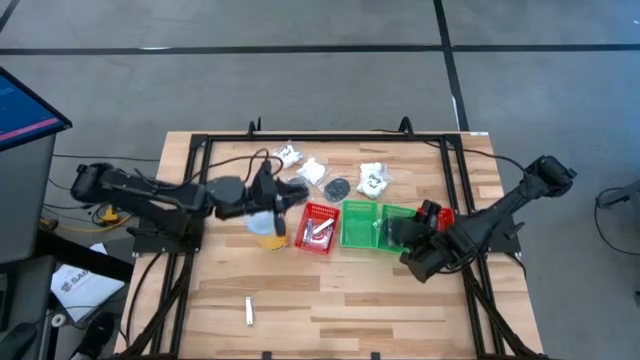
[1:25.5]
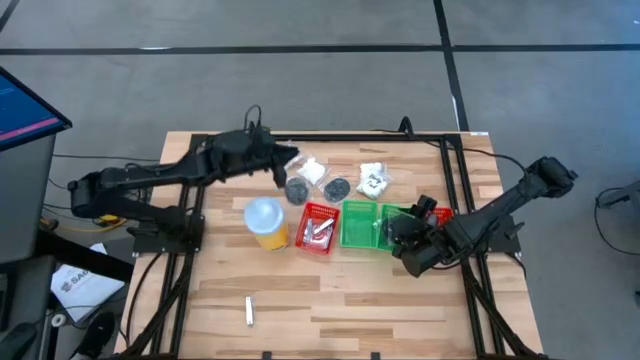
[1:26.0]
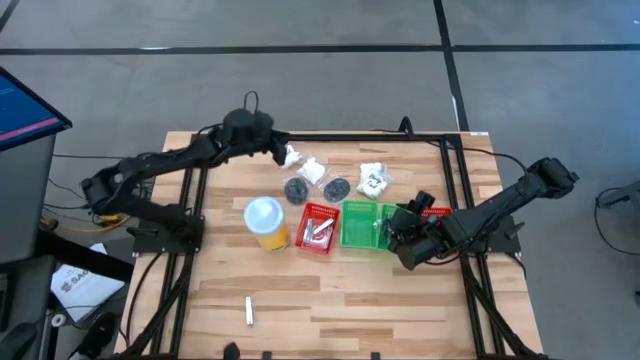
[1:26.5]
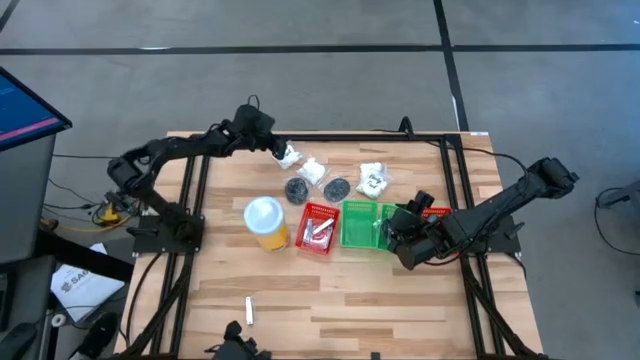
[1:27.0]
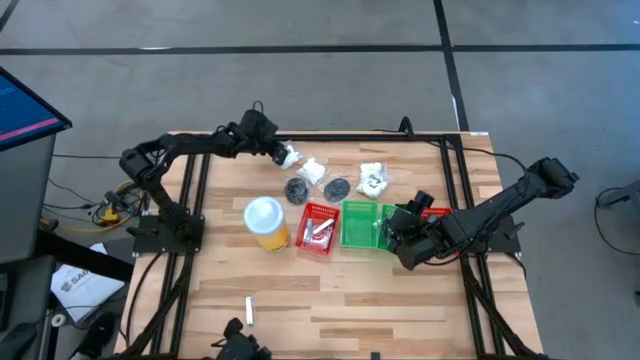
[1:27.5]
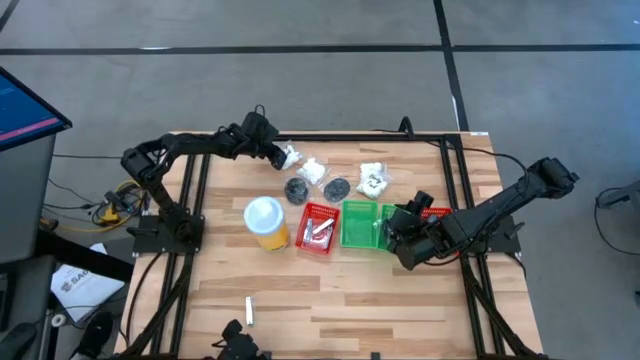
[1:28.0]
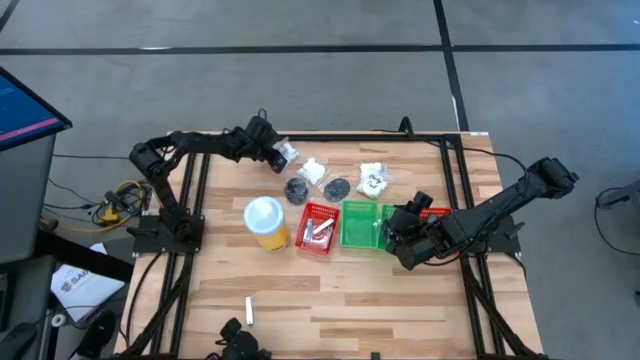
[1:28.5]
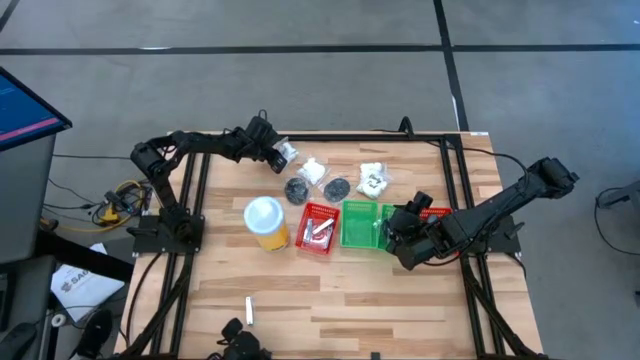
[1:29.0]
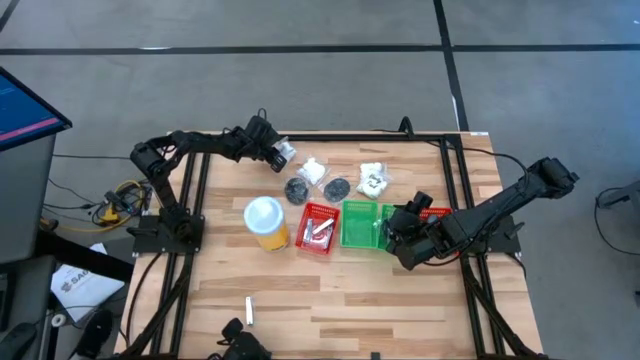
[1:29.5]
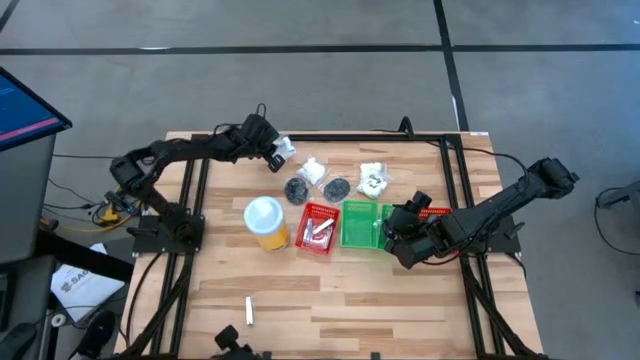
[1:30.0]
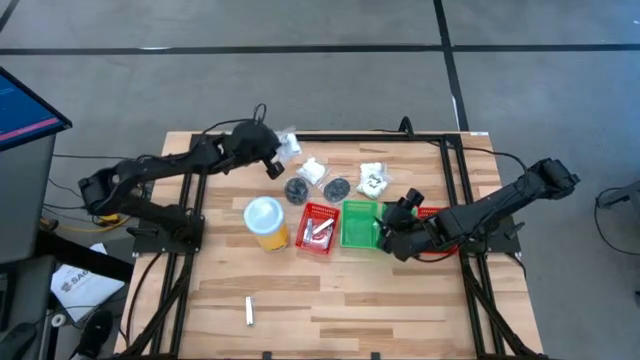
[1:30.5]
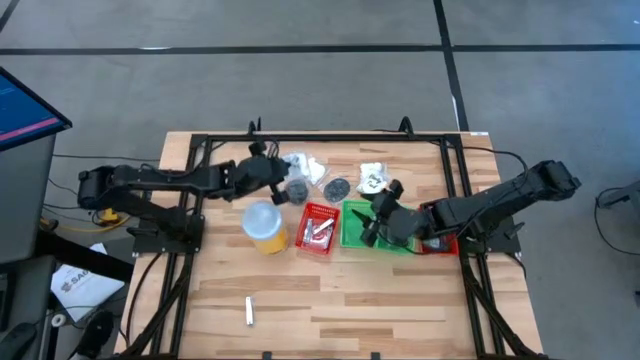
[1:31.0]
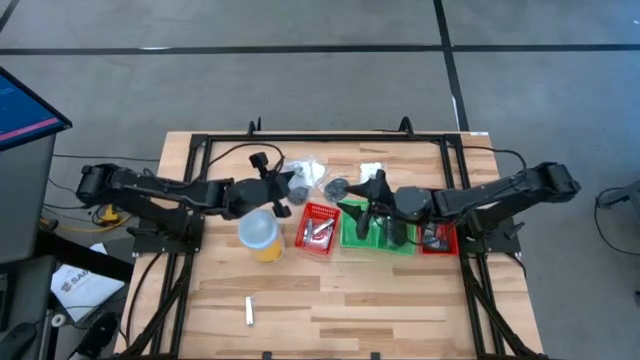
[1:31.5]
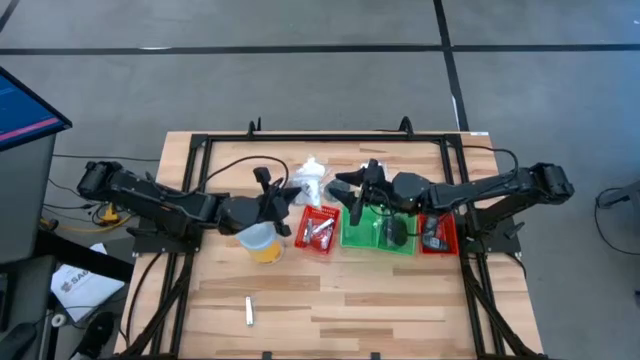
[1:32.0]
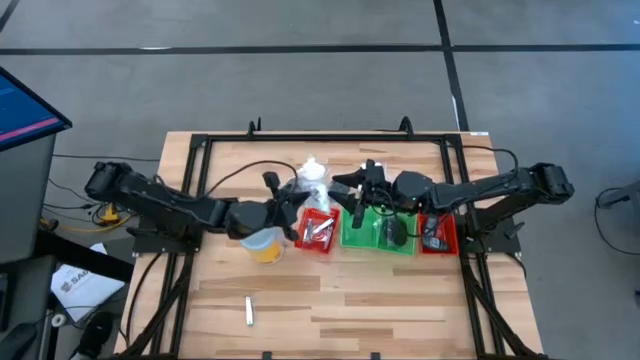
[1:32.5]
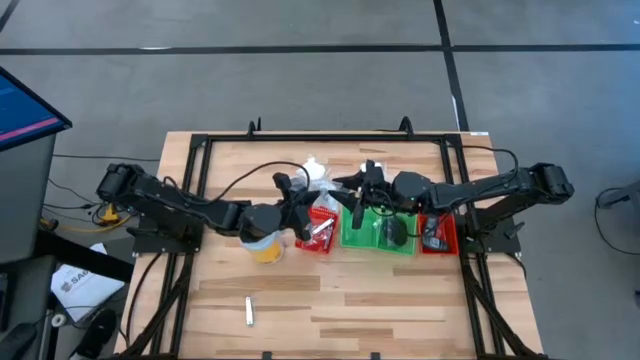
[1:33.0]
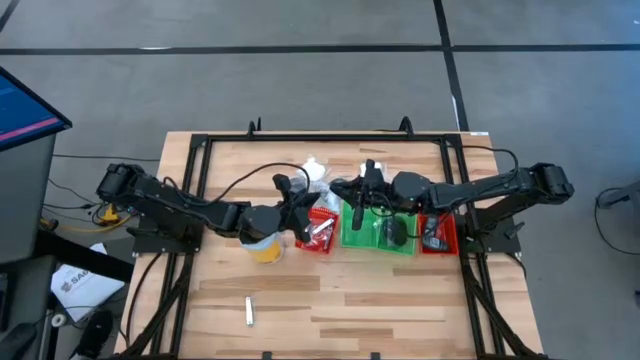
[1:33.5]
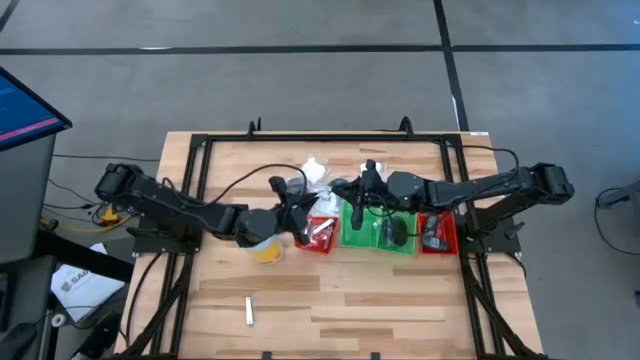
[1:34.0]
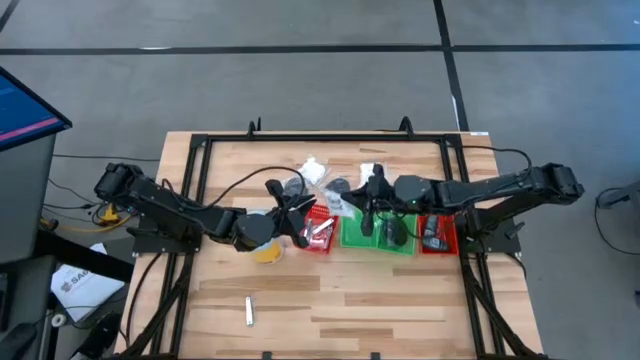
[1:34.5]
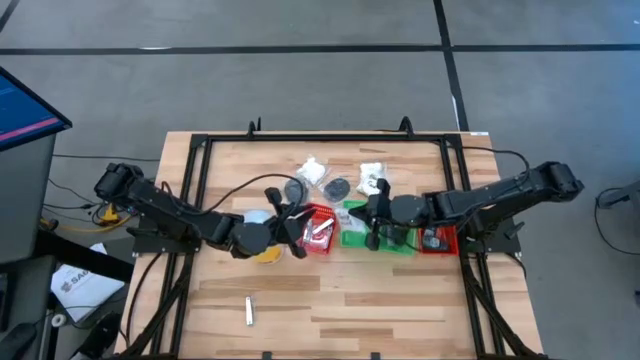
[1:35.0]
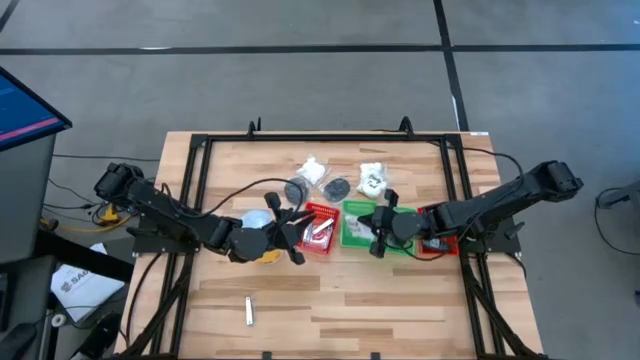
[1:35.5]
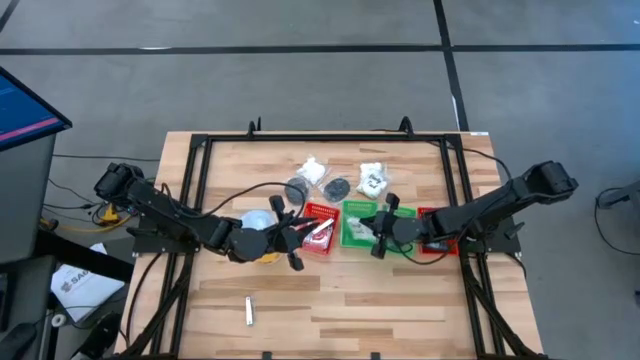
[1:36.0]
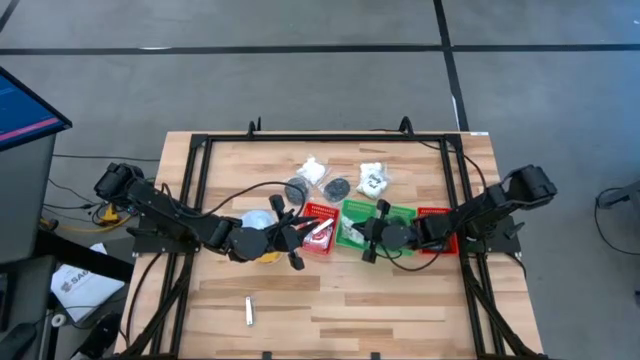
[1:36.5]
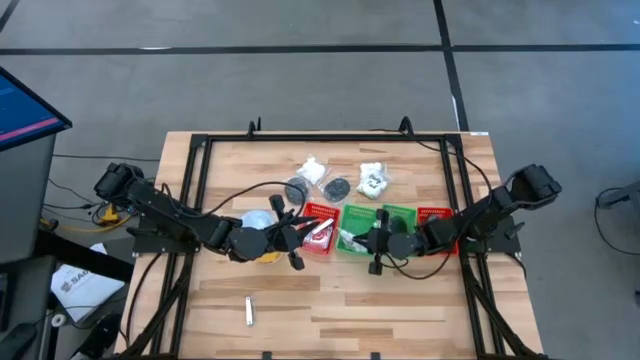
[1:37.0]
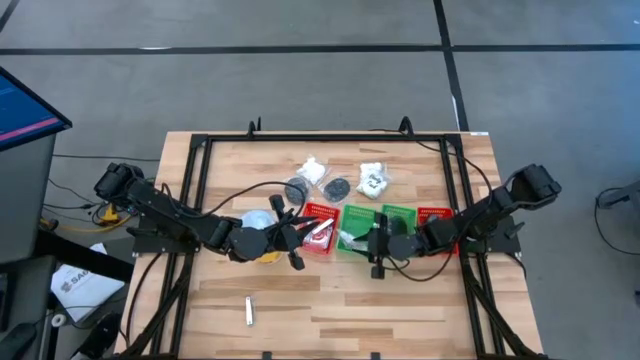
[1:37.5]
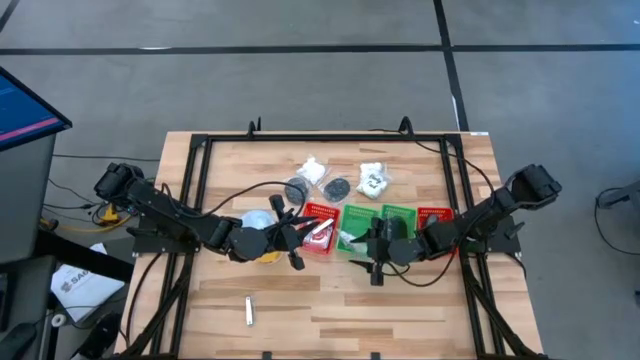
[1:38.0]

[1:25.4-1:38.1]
Task: Pick & Place Travel size toiletries
Put the white cotton pack into the left green bin

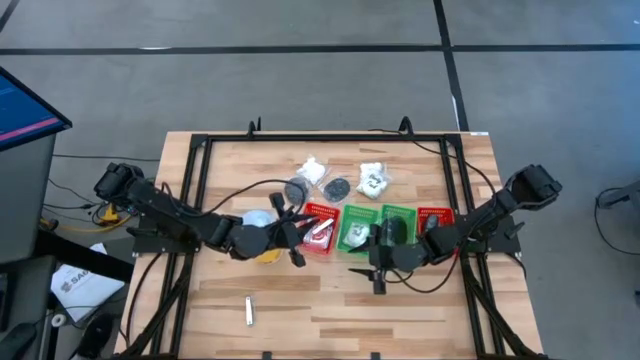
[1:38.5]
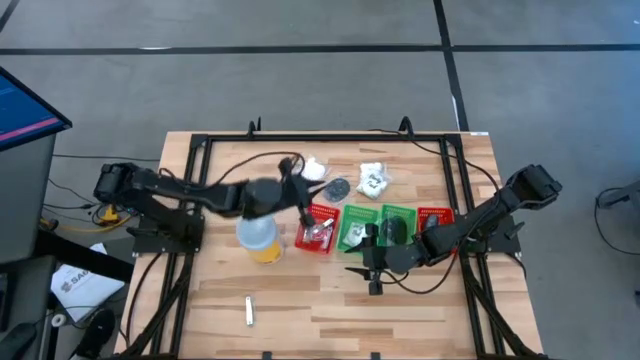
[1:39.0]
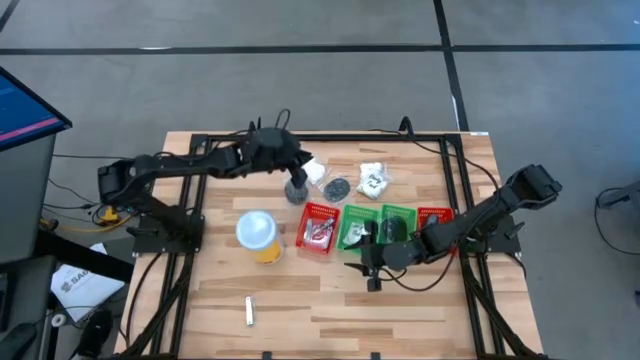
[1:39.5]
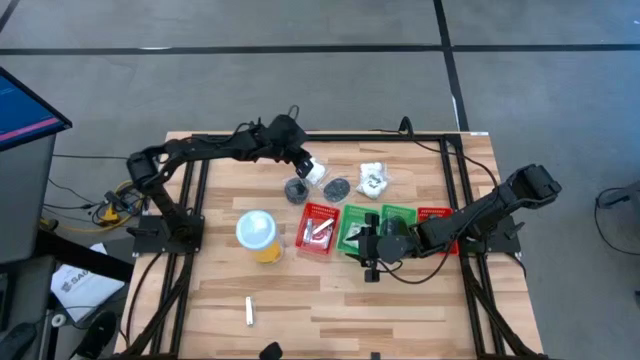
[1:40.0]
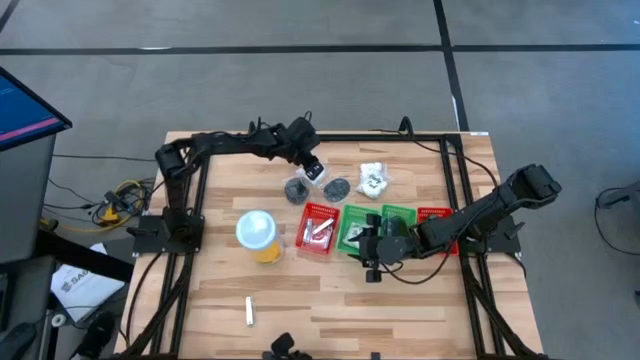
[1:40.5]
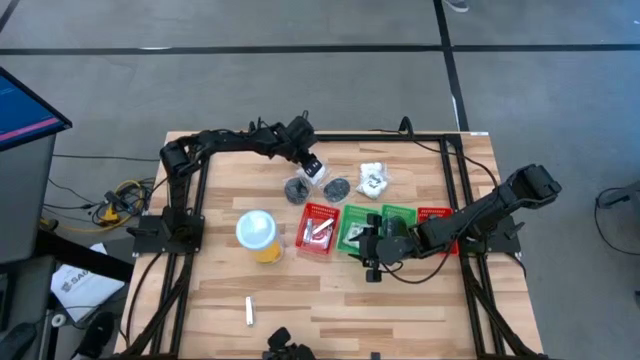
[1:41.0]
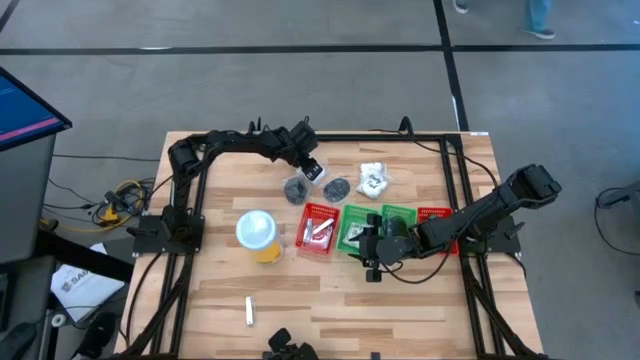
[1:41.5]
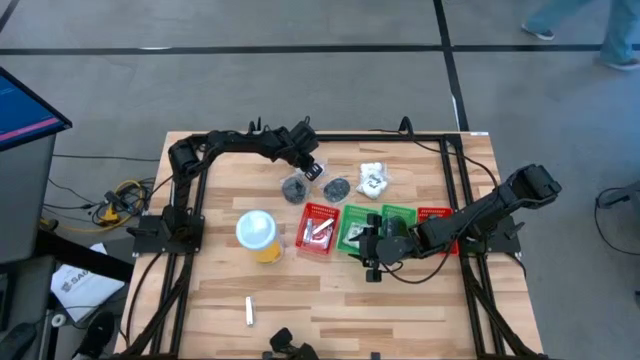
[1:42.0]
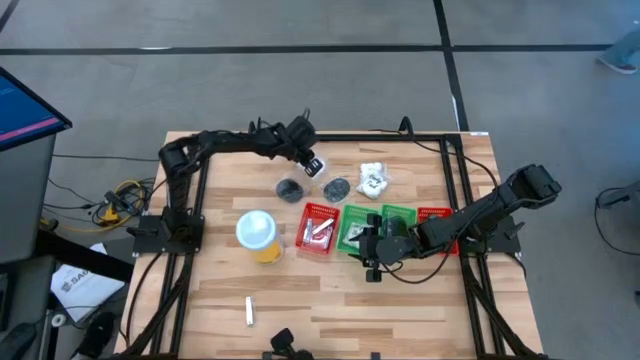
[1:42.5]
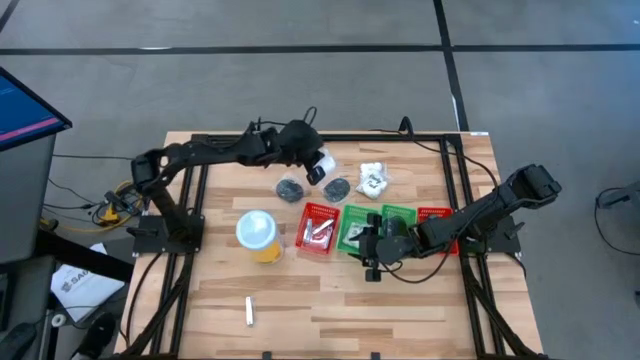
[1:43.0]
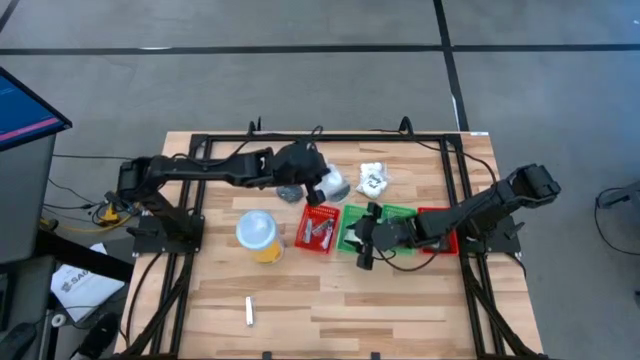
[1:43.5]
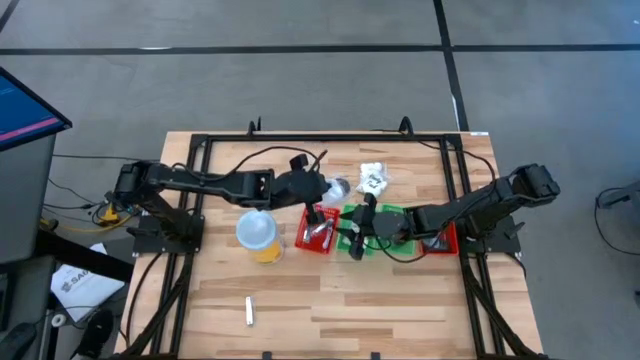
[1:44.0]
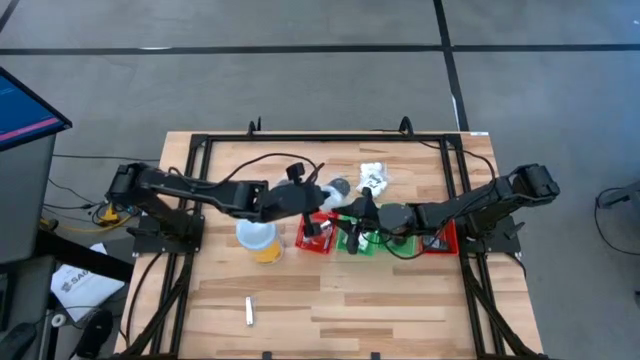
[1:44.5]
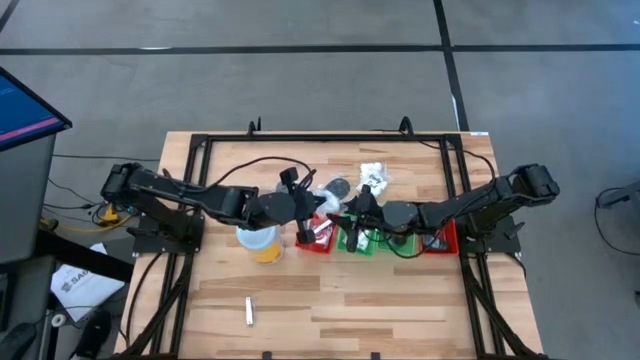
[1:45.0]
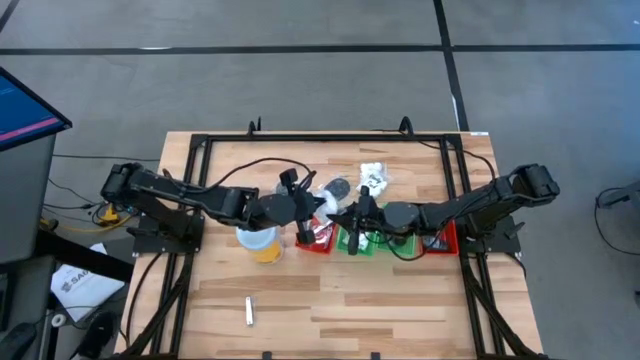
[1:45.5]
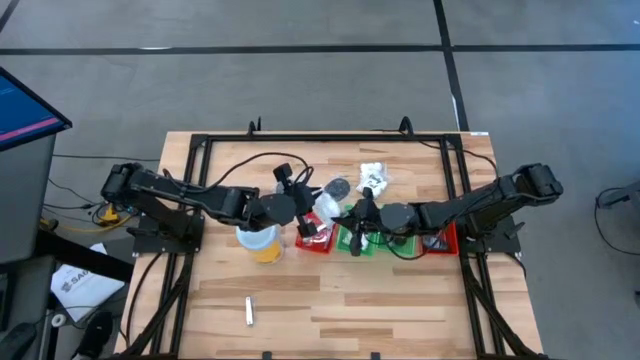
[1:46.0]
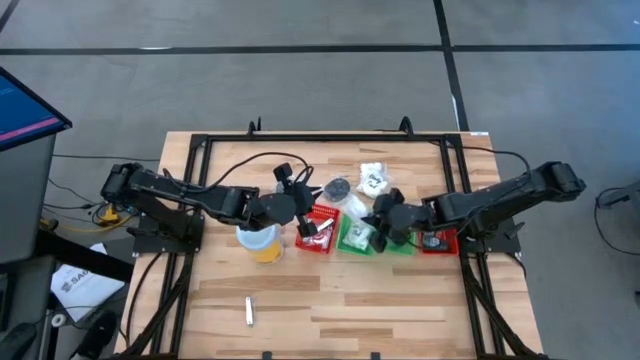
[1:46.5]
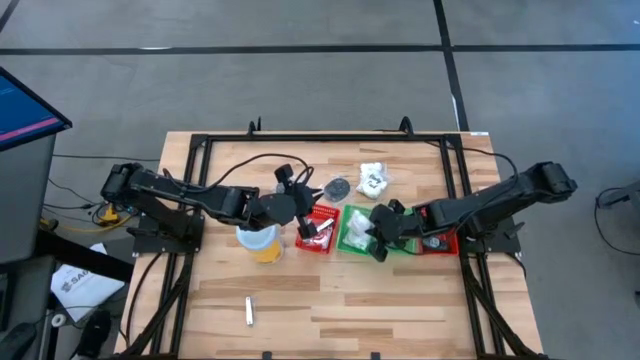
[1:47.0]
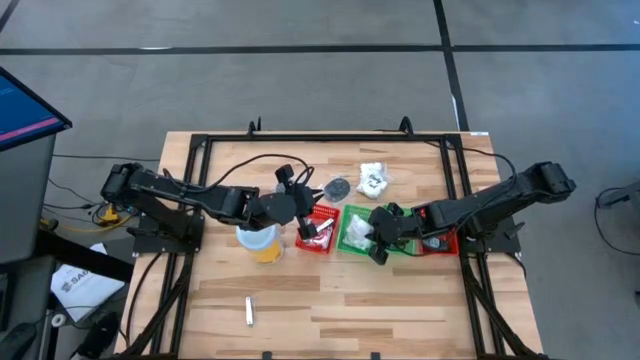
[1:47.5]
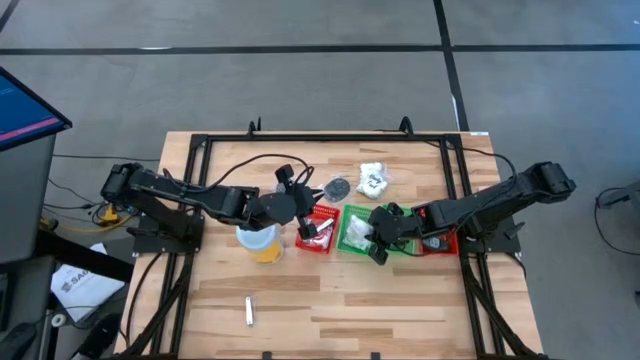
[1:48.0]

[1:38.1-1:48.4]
Put the white cotton pack into the left green bin
